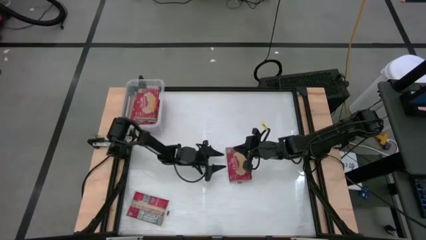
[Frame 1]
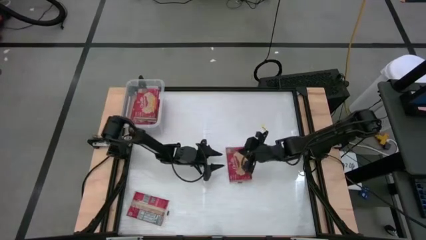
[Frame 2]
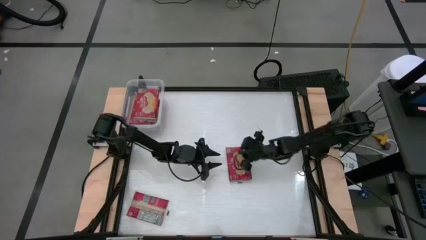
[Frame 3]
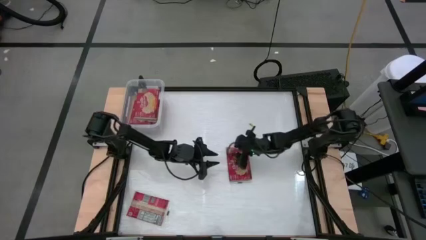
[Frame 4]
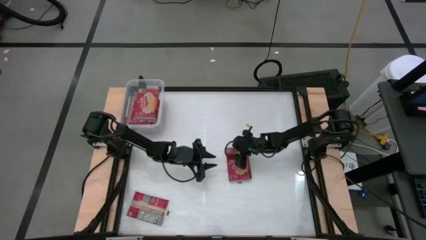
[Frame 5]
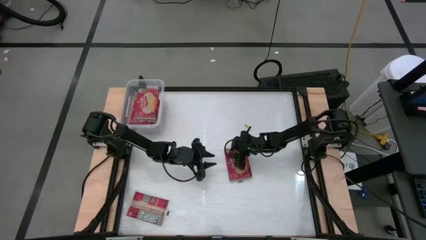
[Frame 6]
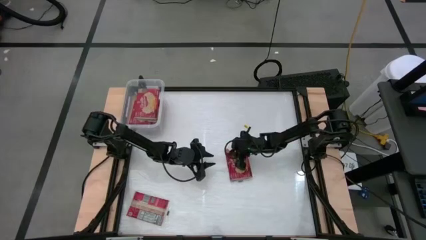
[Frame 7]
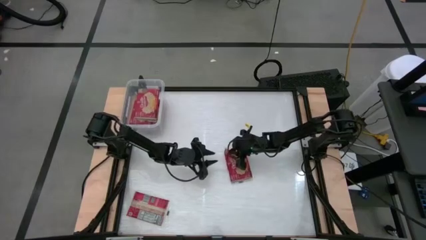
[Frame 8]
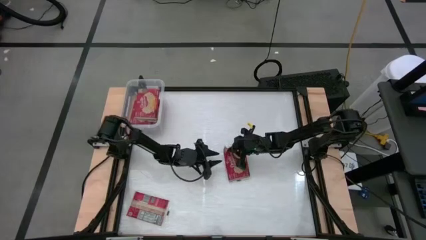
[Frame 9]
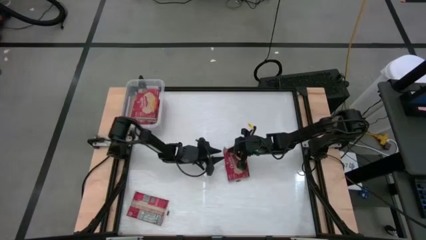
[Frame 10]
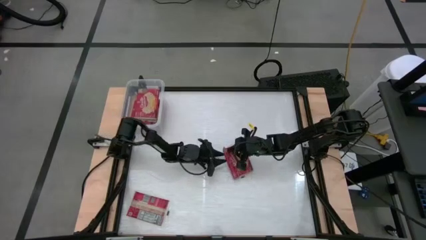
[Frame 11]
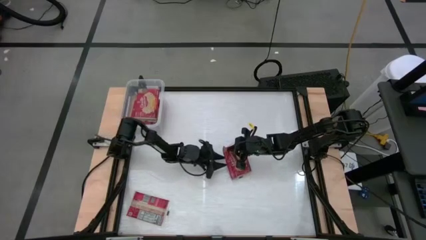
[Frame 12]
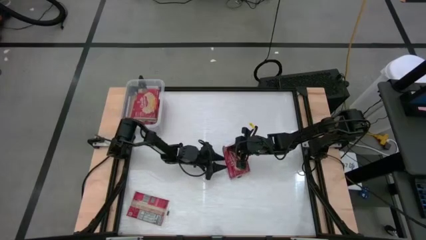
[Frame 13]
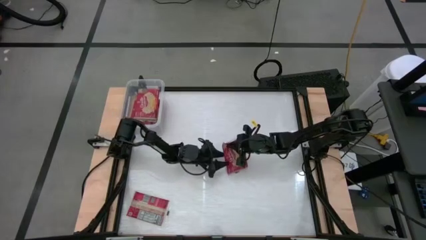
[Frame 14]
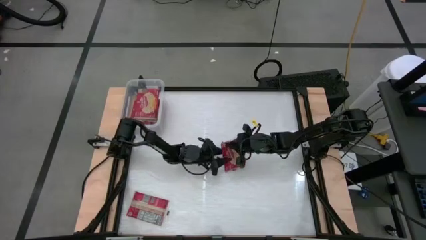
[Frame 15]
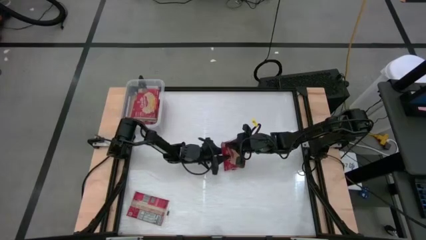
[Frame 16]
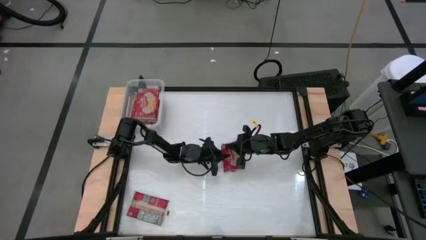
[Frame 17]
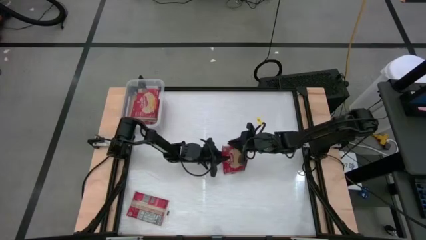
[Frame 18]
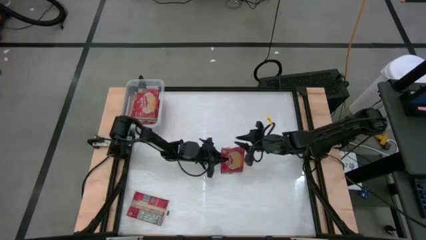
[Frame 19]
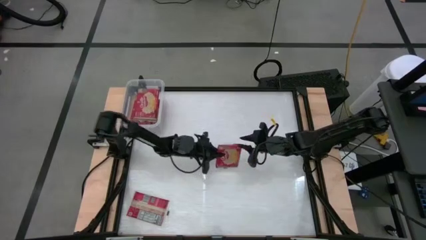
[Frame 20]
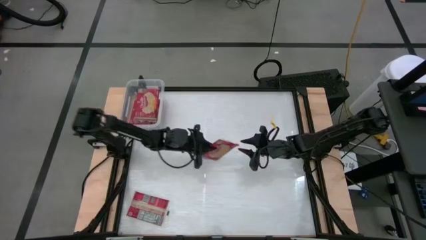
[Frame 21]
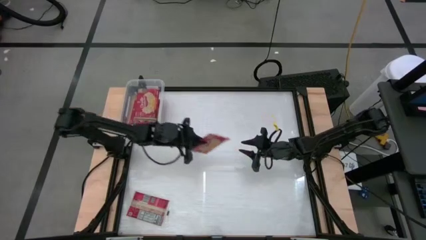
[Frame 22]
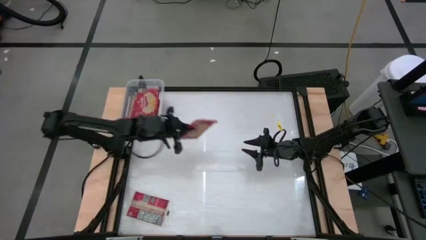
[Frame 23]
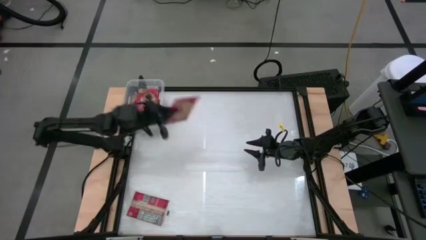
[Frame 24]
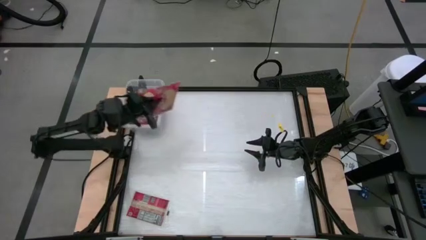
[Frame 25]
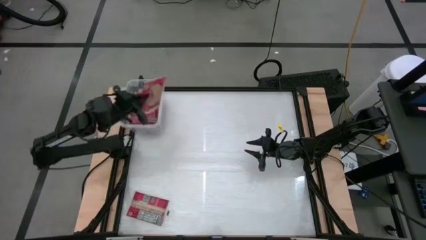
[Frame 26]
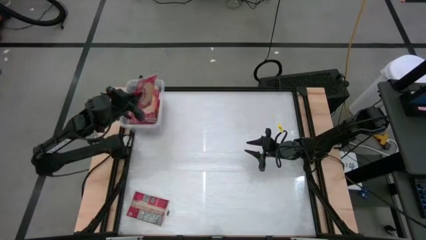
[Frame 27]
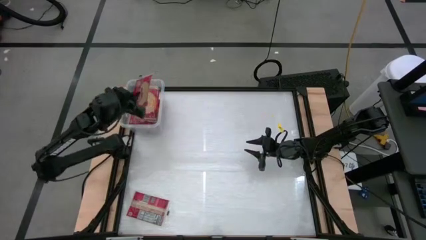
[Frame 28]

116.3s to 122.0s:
Task: Sort popcorn bags into baskets
Stack the red popcorn pack into the bin

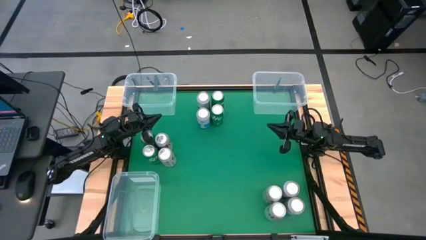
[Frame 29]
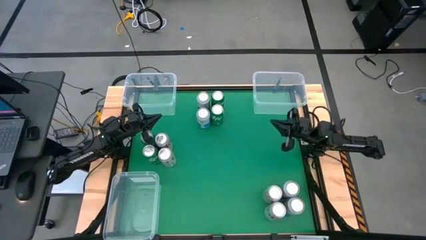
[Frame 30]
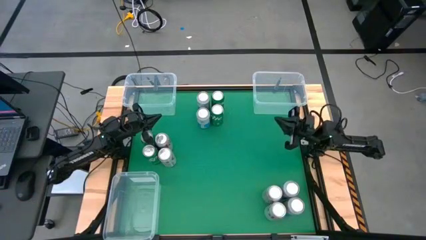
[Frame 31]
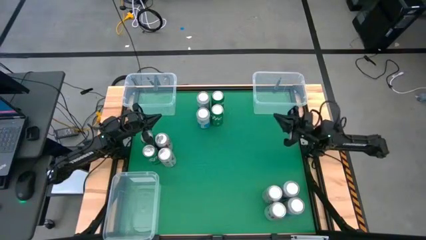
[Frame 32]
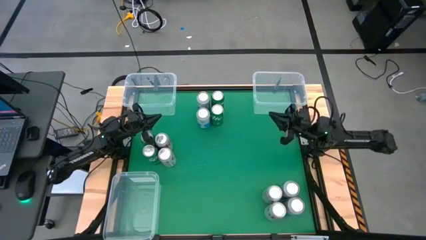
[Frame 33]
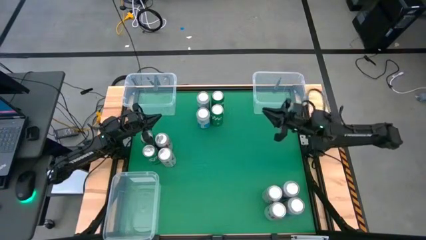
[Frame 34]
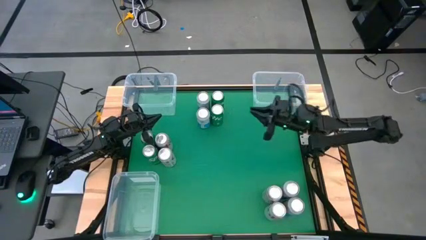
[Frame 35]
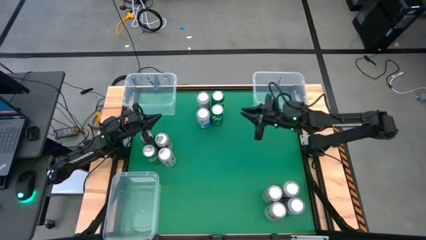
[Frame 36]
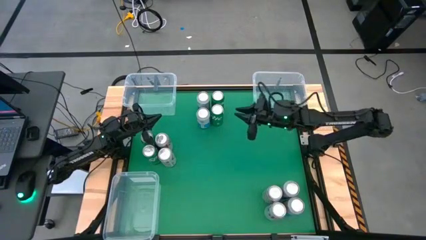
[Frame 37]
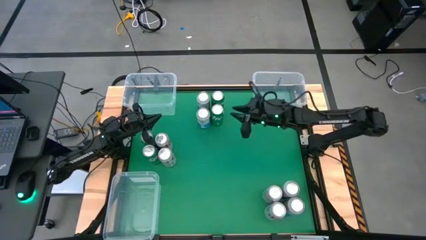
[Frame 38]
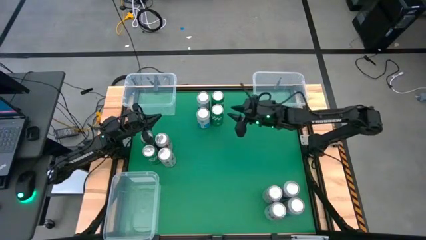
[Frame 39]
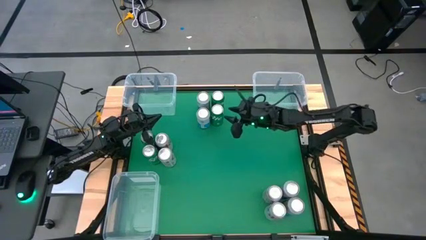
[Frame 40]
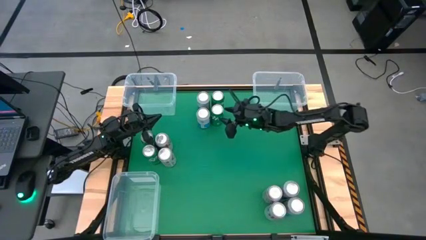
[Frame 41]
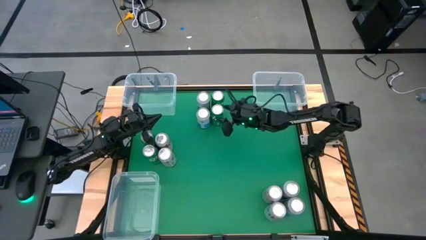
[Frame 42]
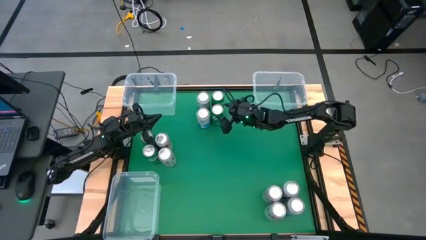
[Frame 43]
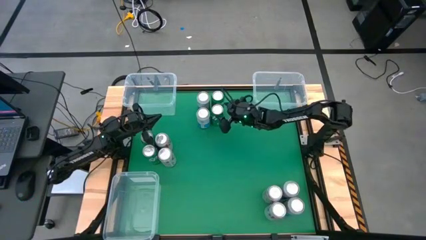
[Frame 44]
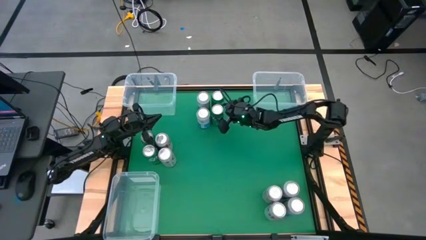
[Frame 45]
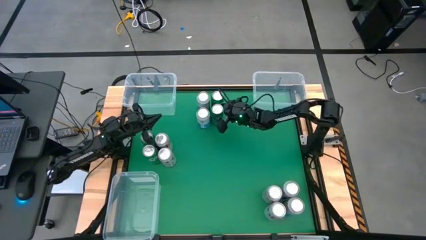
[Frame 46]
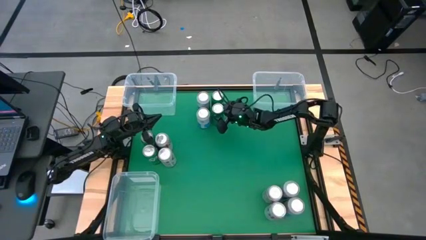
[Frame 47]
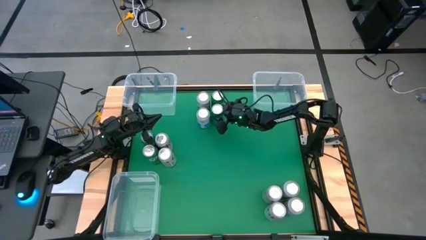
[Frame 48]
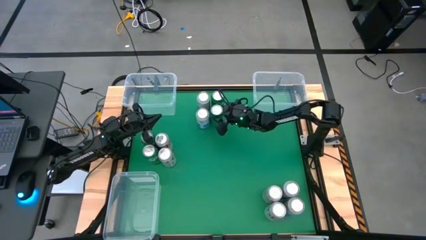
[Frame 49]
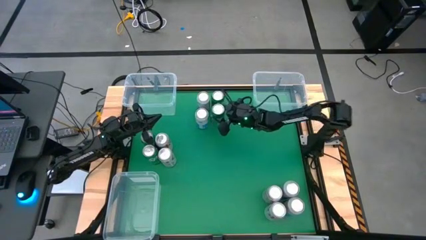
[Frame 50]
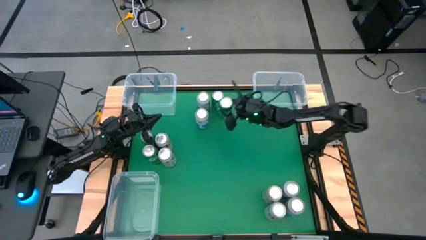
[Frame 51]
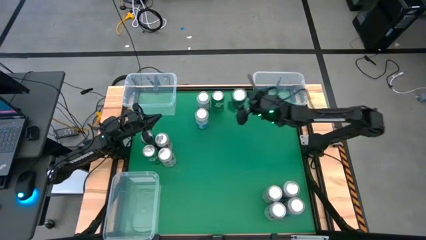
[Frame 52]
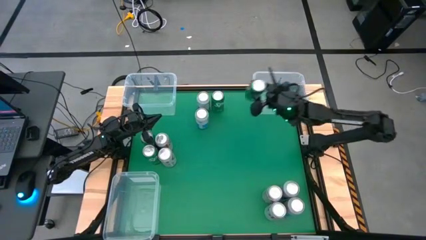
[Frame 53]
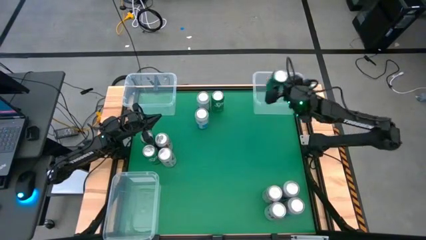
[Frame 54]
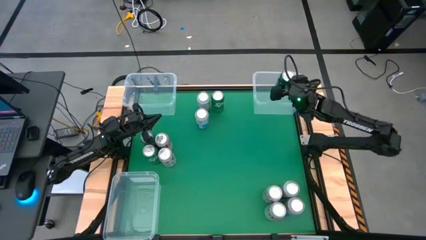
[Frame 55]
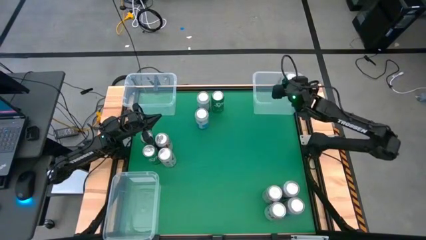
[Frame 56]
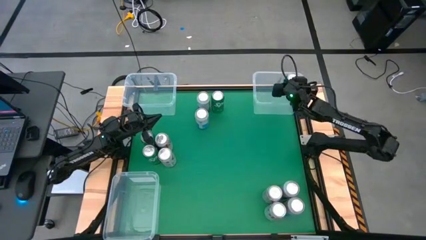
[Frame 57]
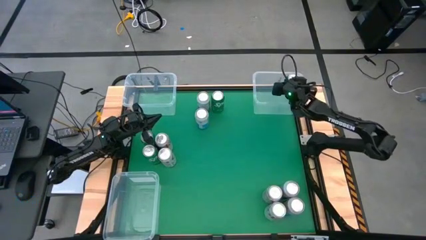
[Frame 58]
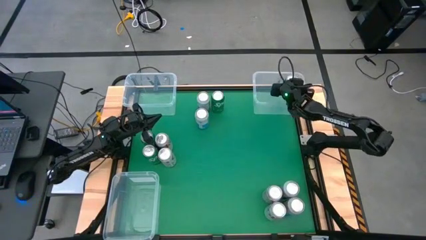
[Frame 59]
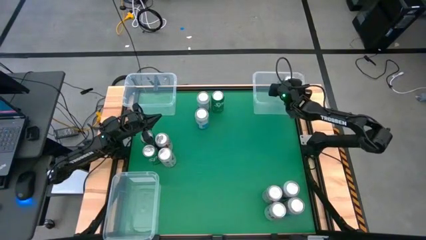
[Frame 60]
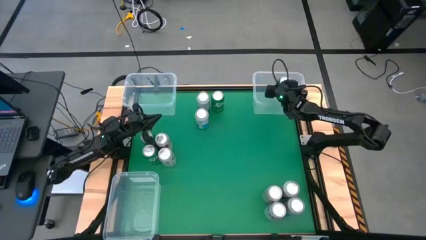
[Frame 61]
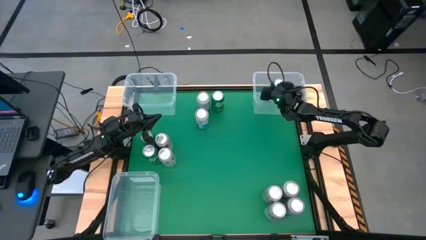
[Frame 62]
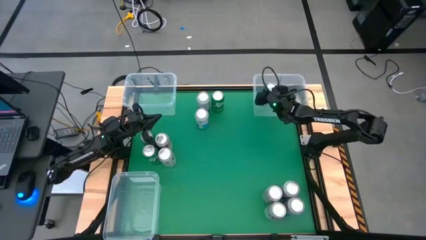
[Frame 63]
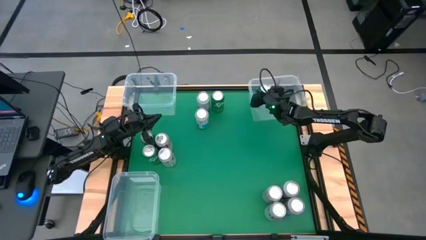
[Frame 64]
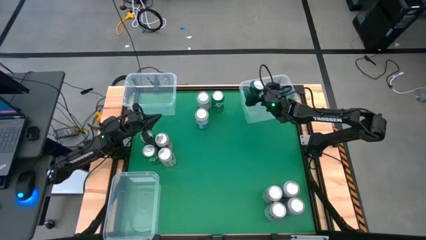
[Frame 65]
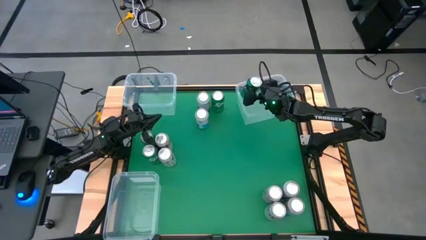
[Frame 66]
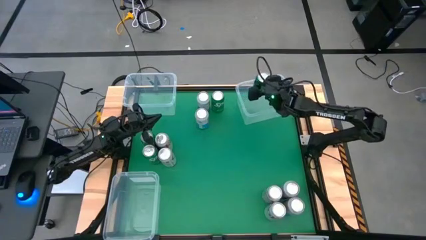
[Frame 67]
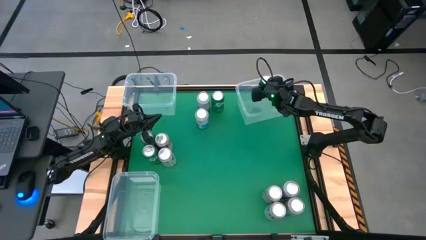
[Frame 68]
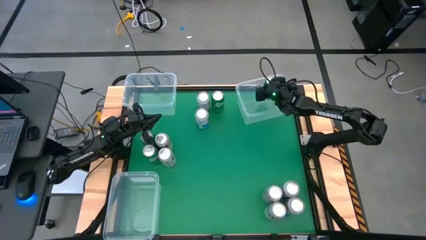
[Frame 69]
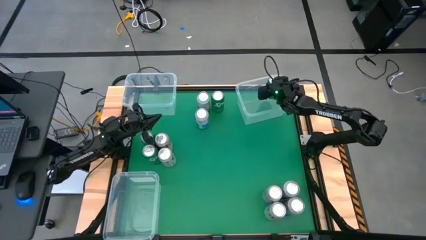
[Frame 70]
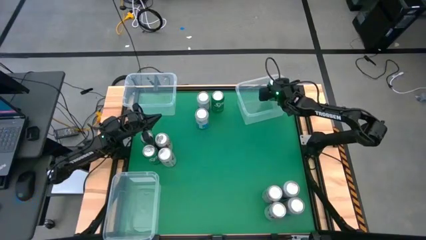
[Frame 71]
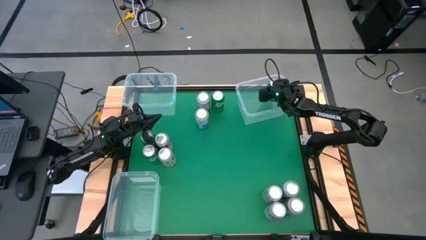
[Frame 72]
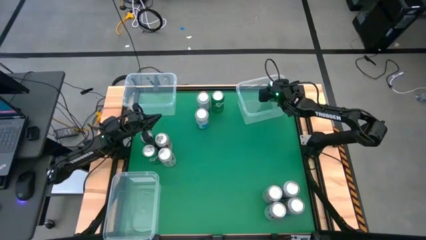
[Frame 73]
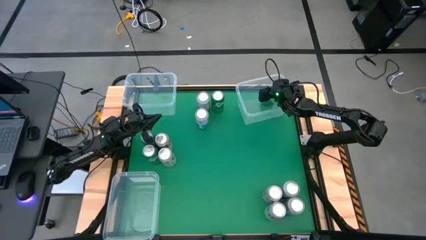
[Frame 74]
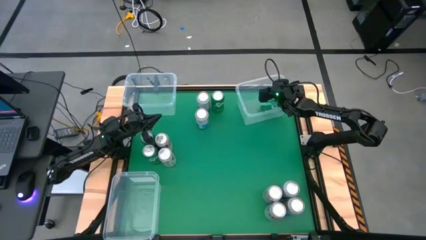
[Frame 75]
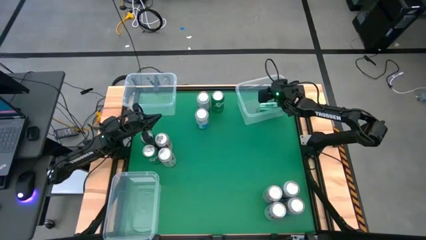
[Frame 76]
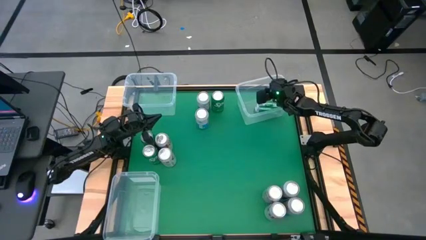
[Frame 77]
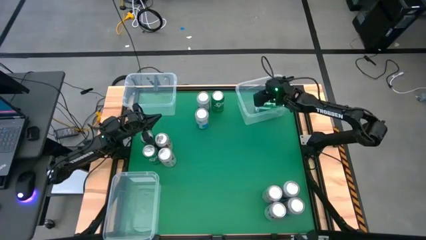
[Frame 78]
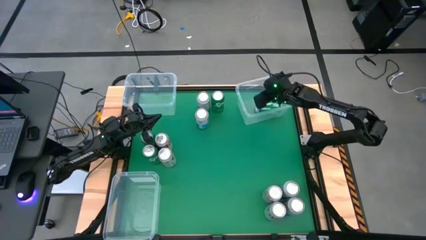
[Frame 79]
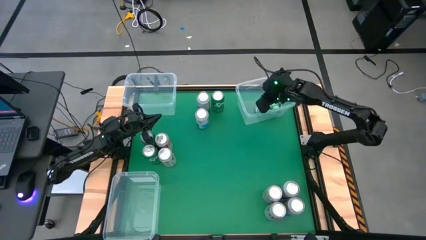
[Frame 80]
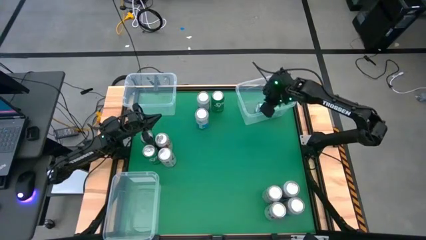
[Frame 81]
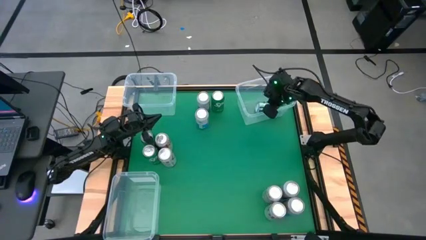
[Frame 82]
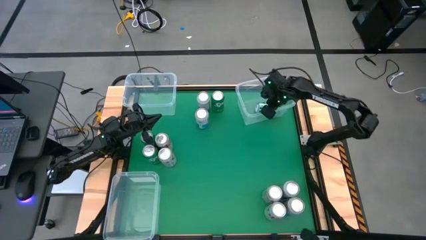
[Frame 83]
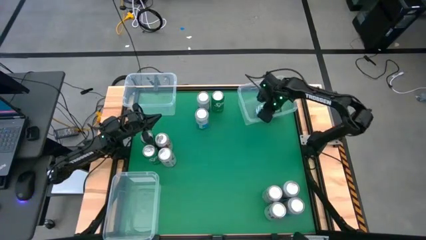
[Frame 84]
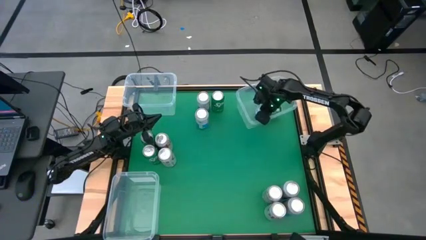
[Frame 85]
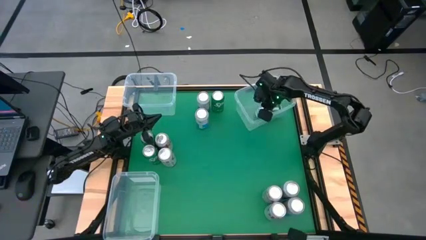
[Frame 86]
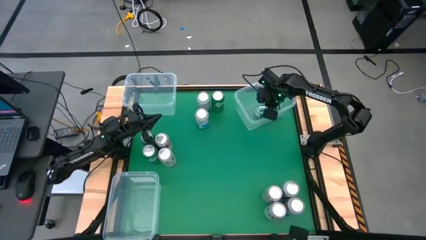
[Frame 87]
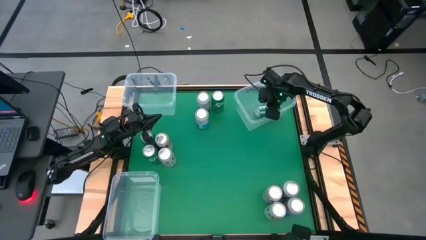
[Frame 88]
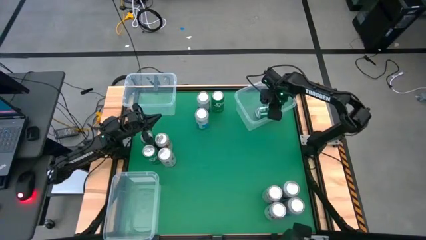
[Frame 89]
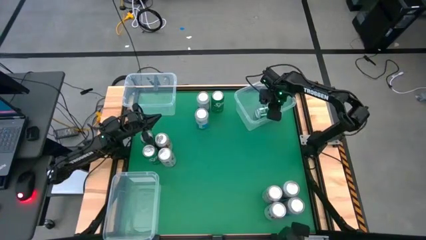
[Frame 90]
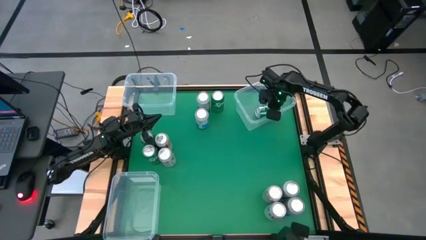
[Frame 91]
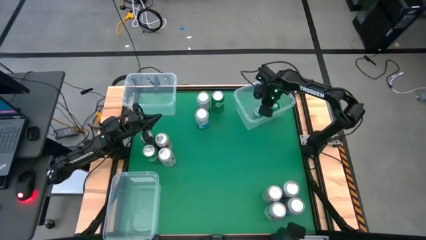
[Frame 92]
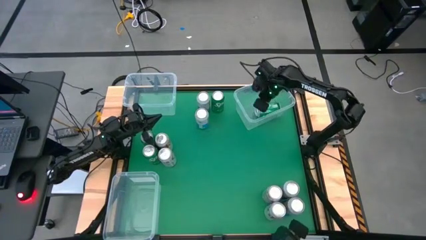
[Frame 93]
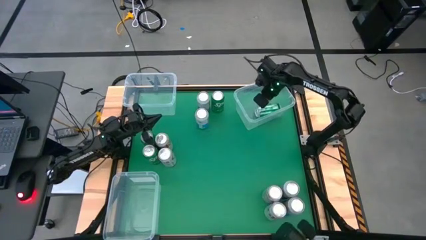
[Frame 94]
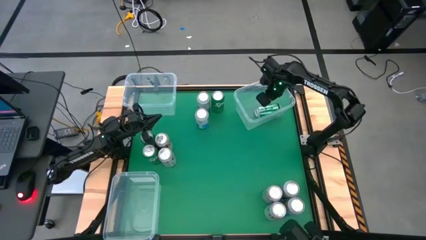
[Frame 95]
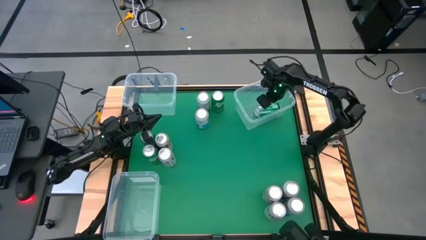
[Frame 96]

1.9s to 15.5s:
Task: Sort soda cans
Put the green soda can into the top right transparent bin
